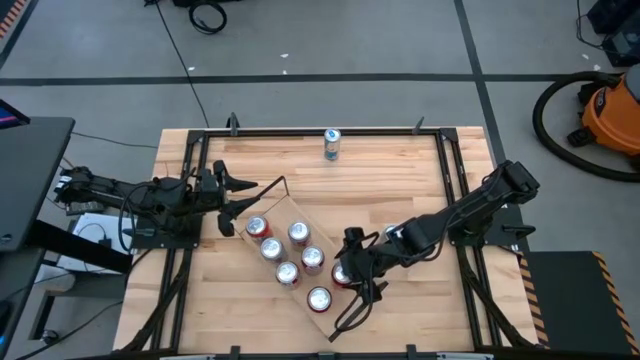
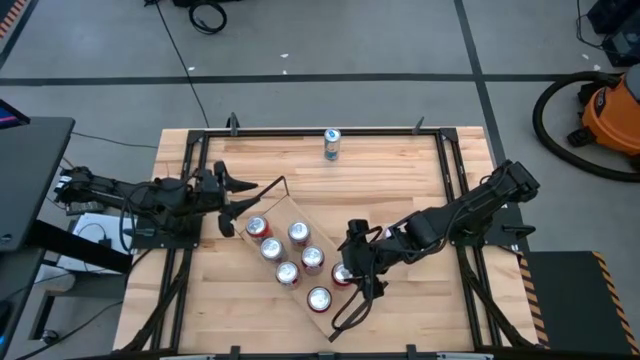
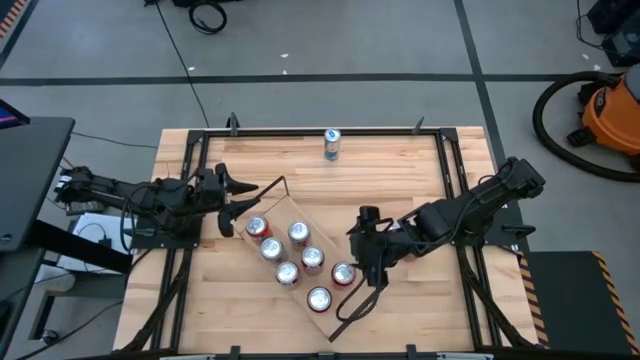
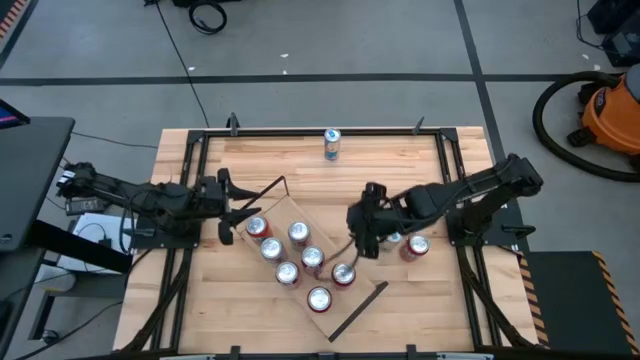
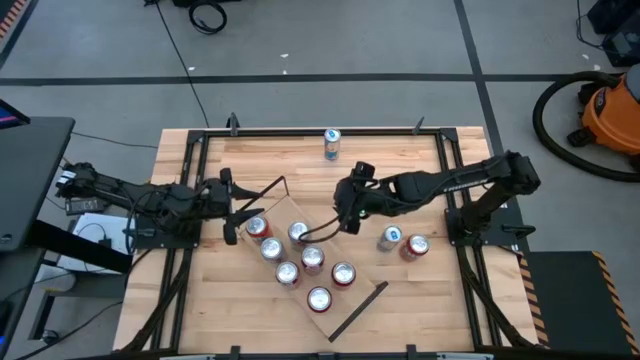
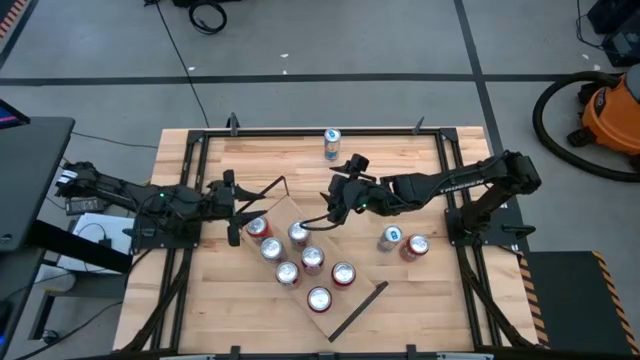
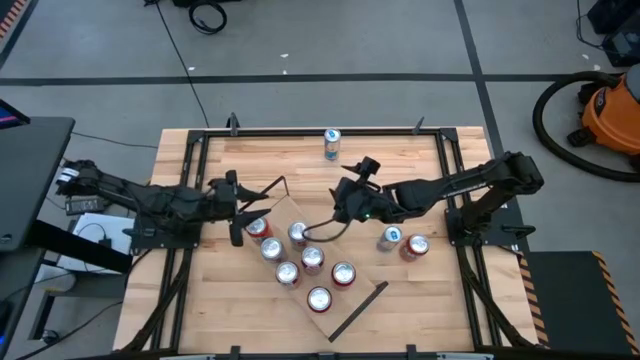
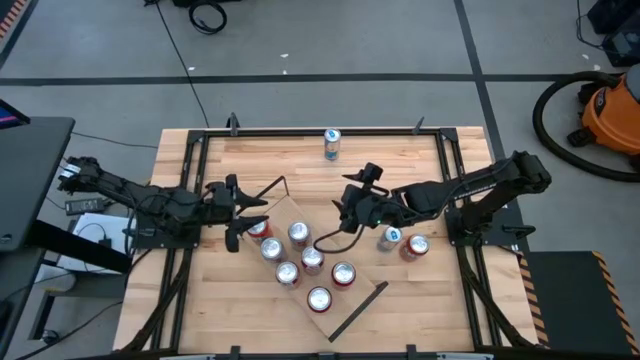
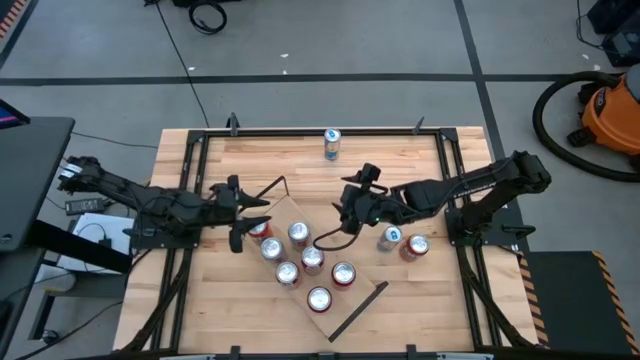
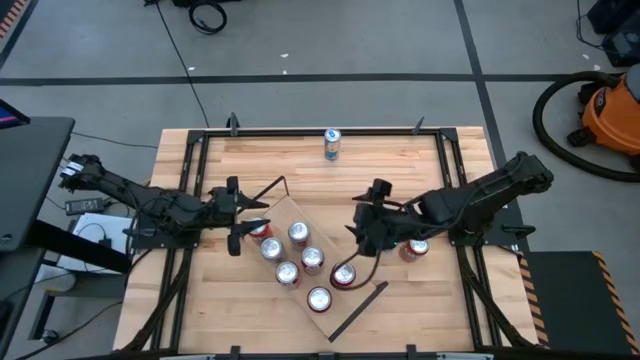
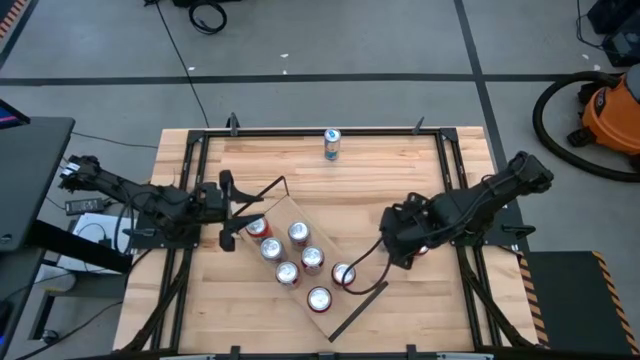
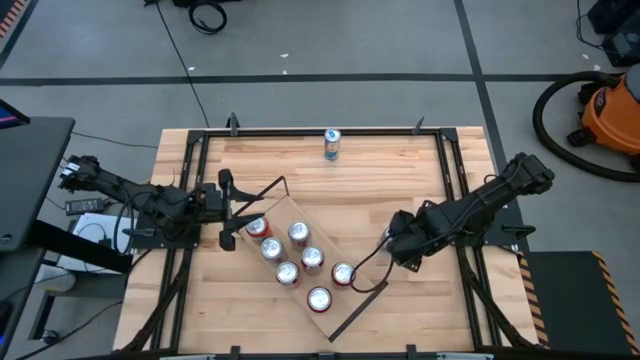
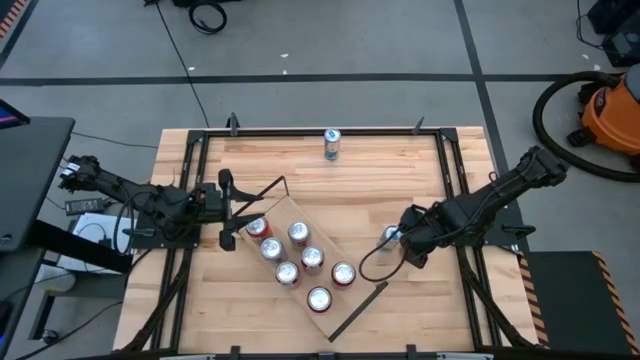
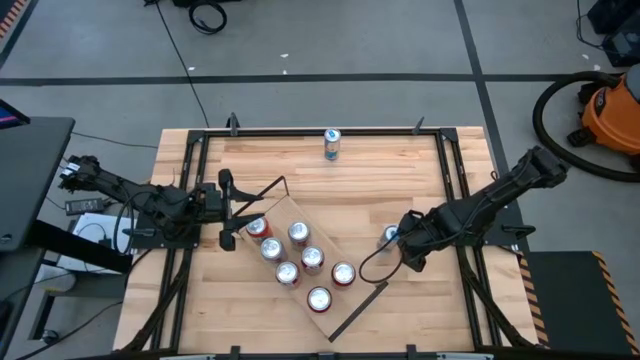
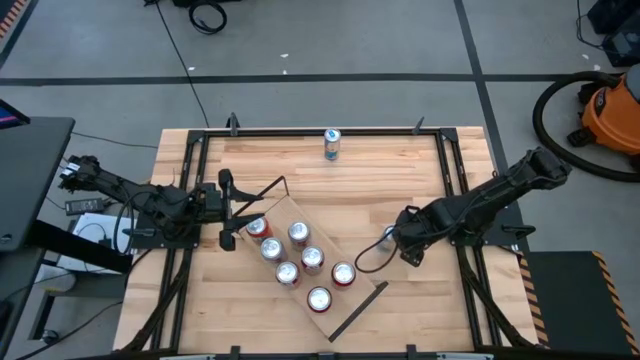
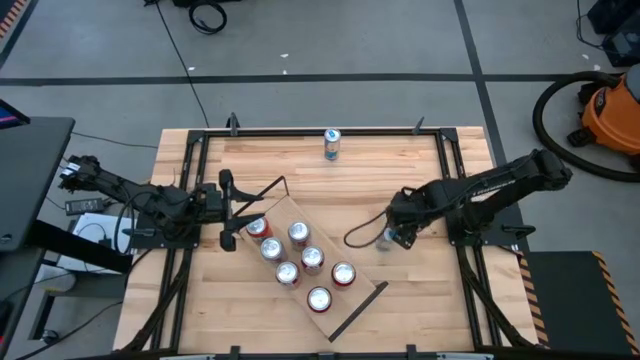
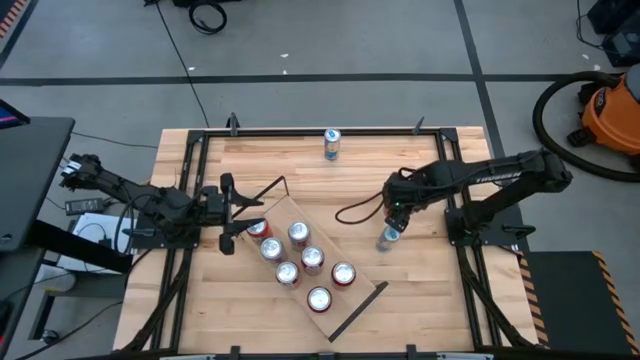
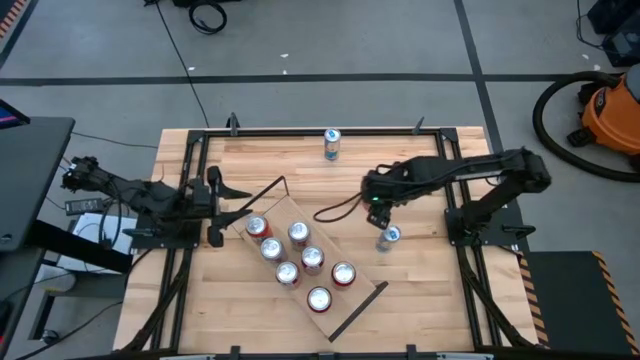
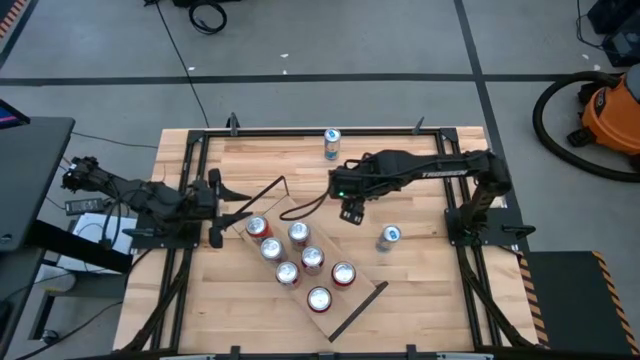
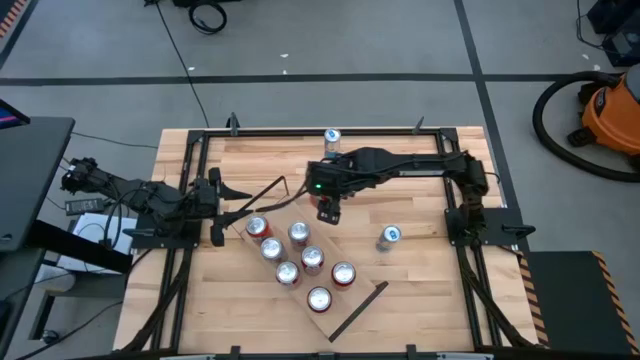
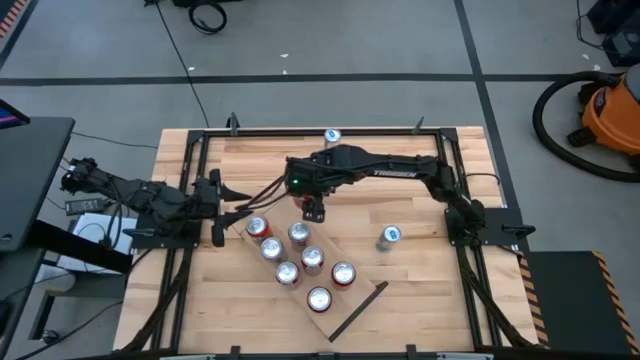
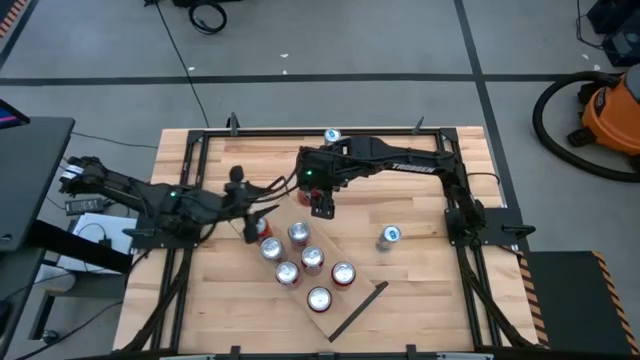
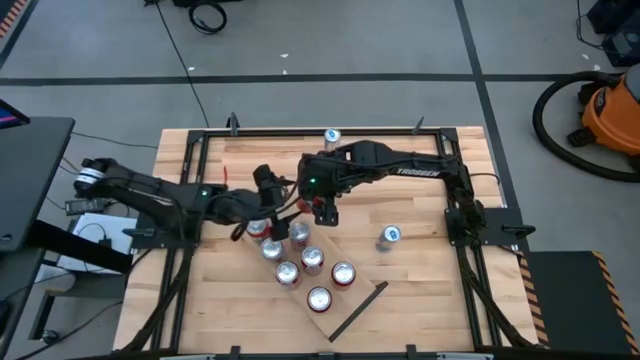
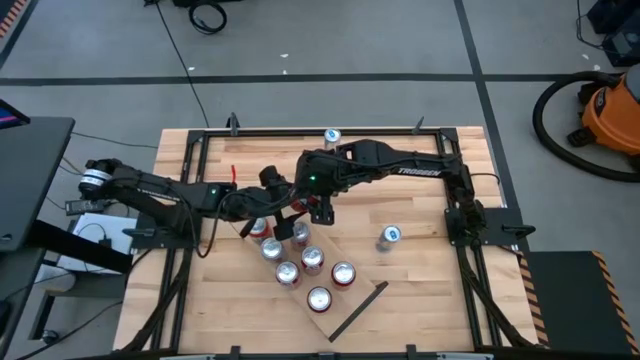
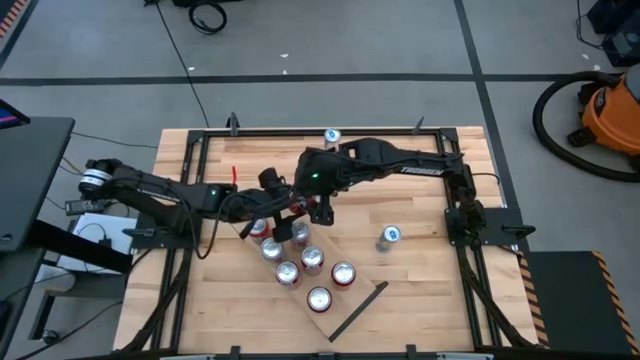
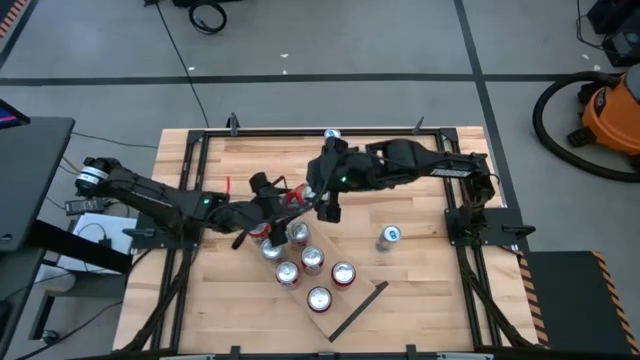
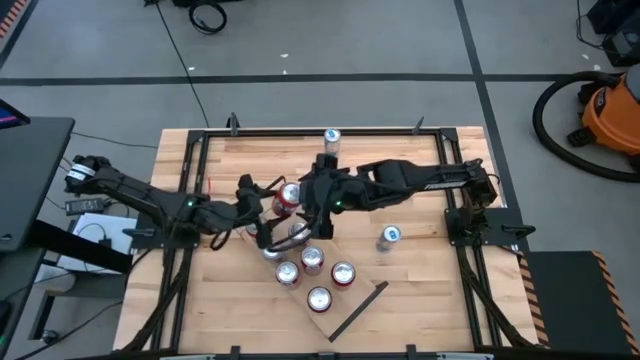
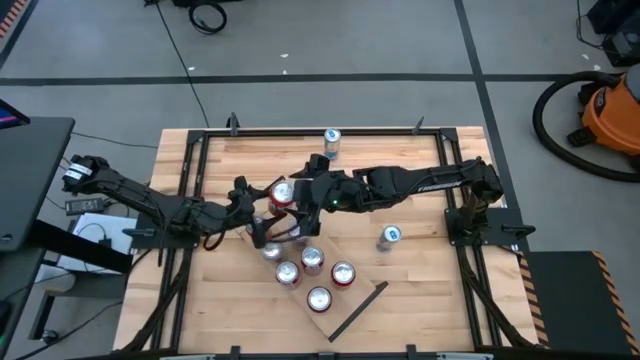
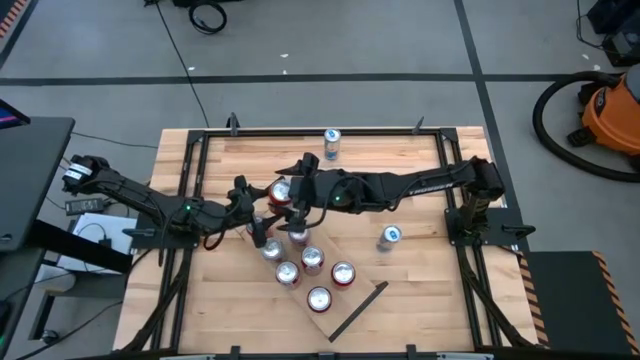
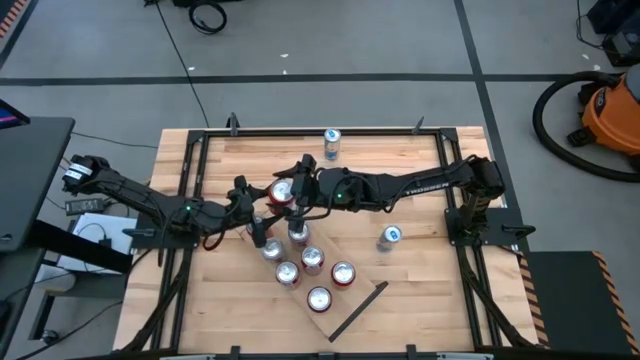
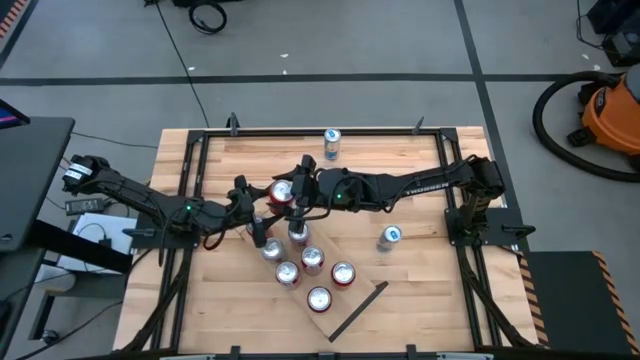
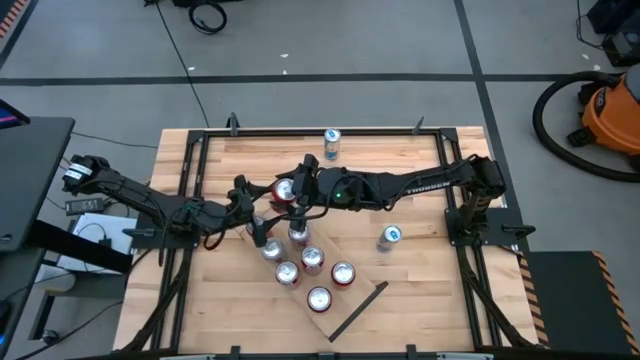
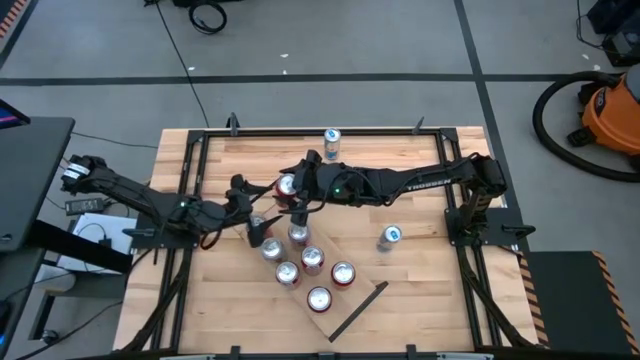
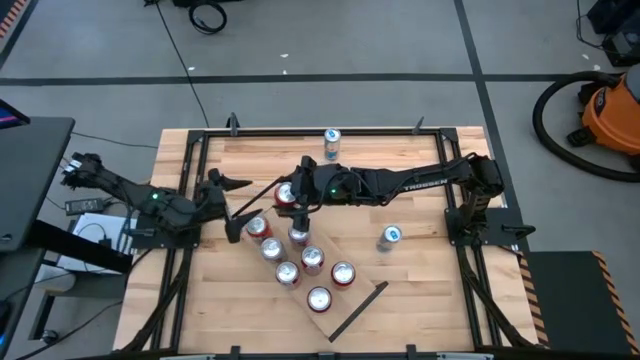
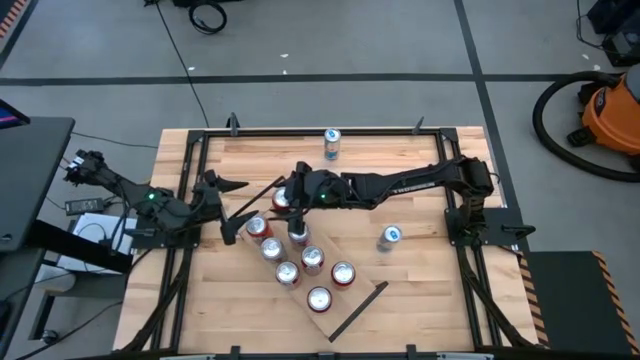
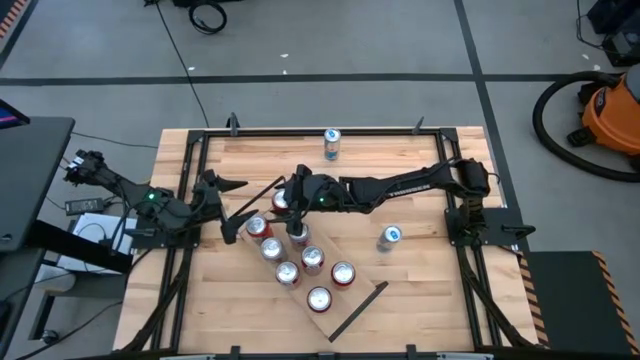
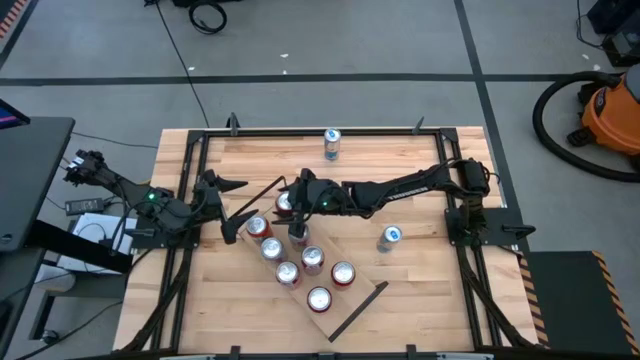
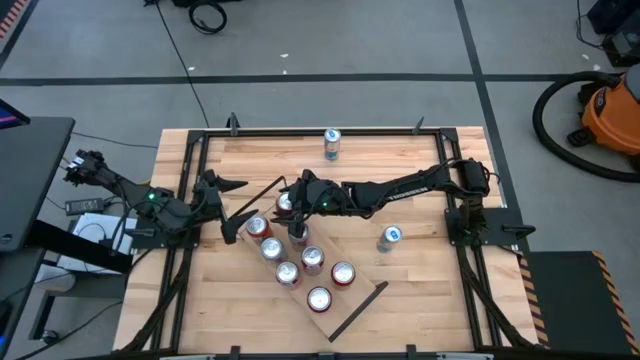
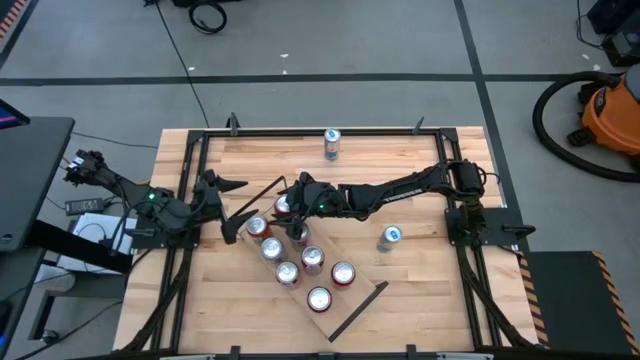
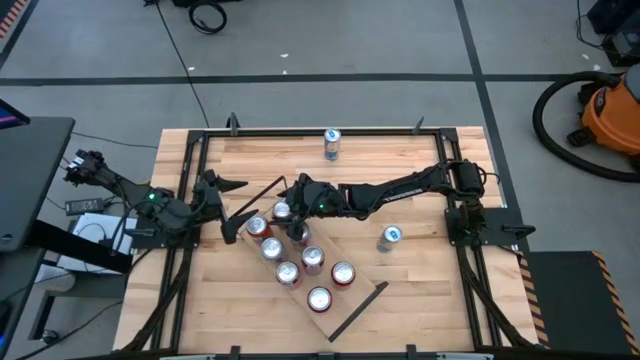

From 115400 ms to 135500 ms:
Task: Place canned beverage on shelf
Put the orange soda can on the shelf aligned with the other orange soda can

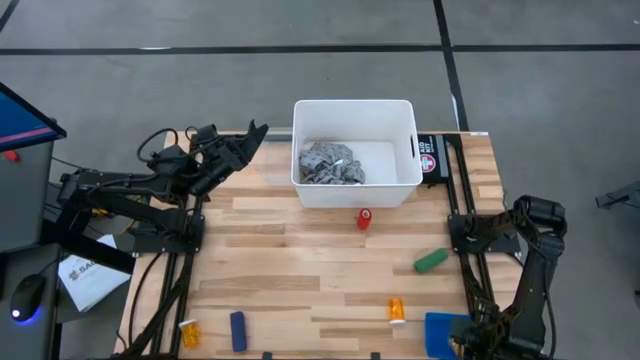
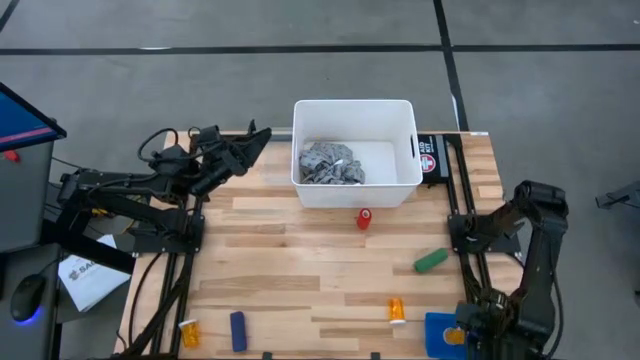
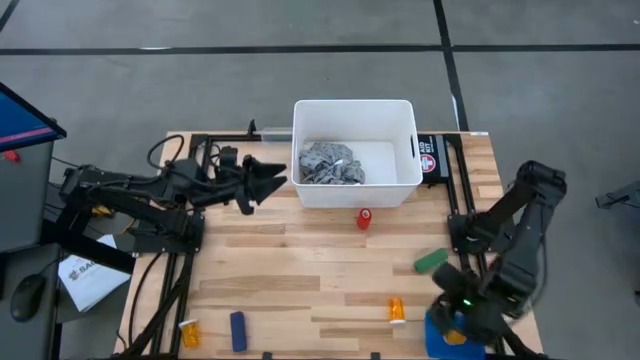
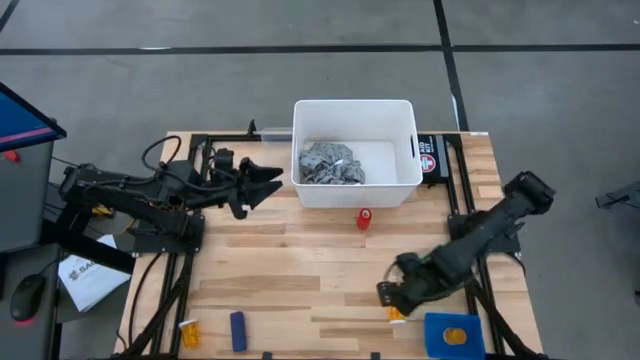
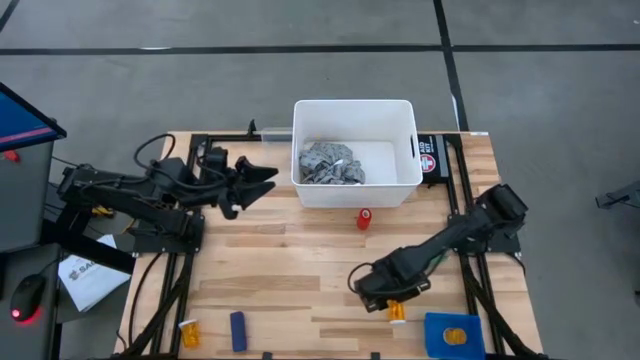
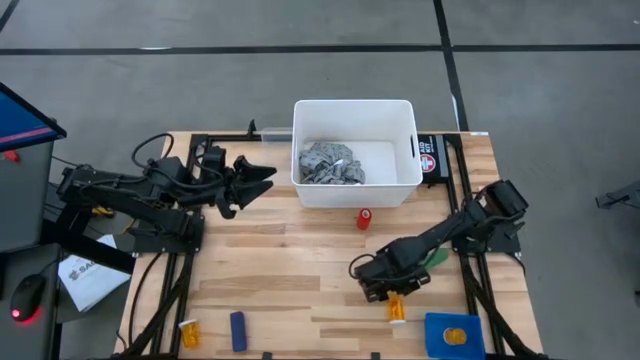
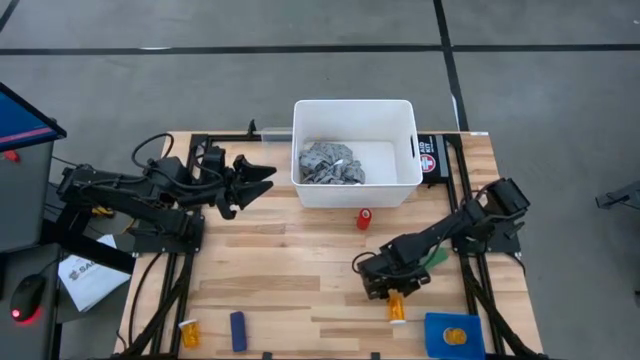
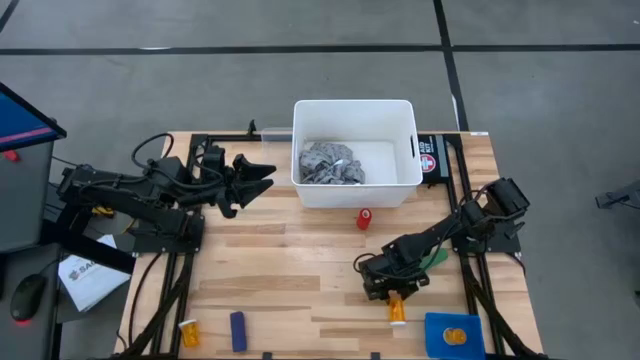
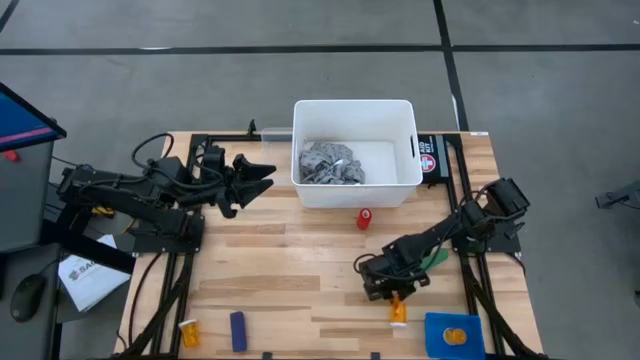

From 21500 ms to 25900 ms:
Task: Pick & Place Medicine items
Put the right orange pill bottle into the blue bin
